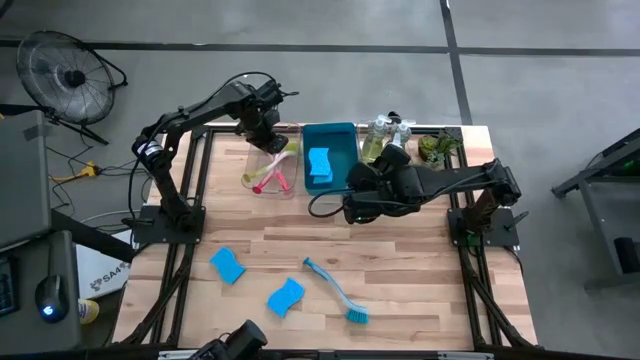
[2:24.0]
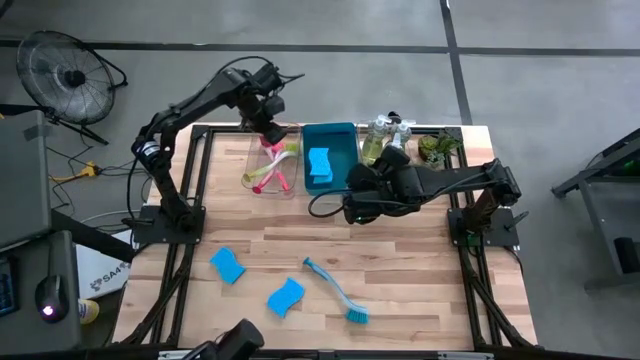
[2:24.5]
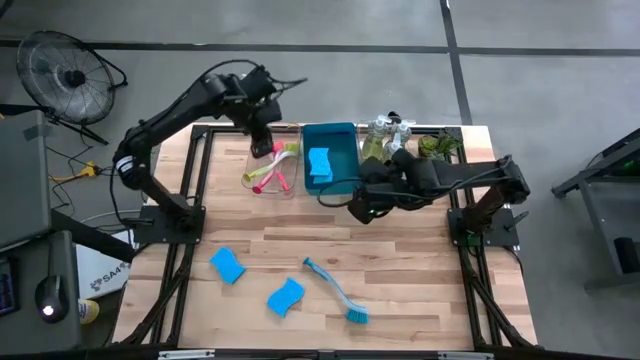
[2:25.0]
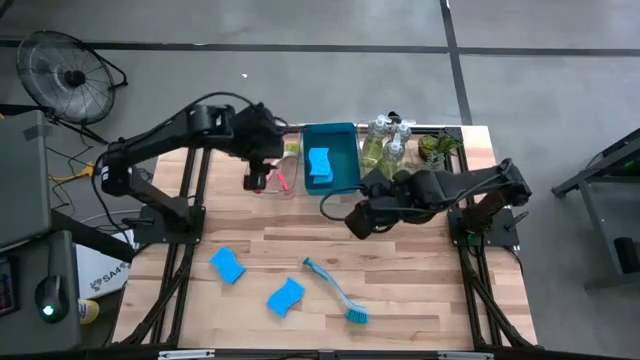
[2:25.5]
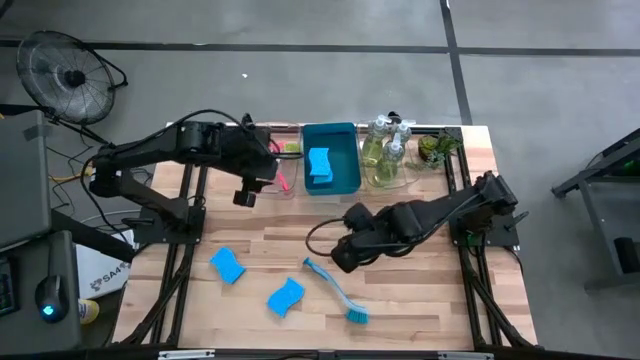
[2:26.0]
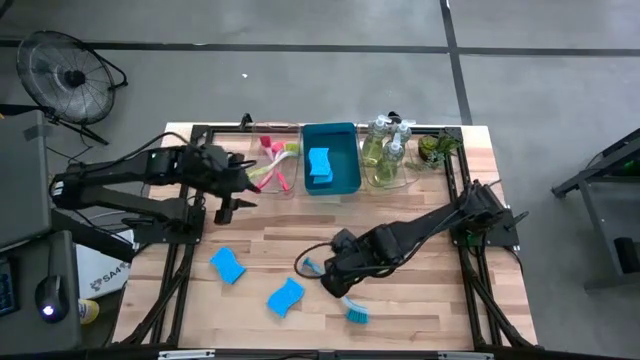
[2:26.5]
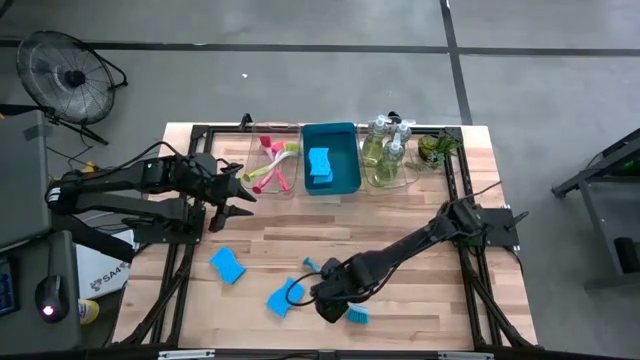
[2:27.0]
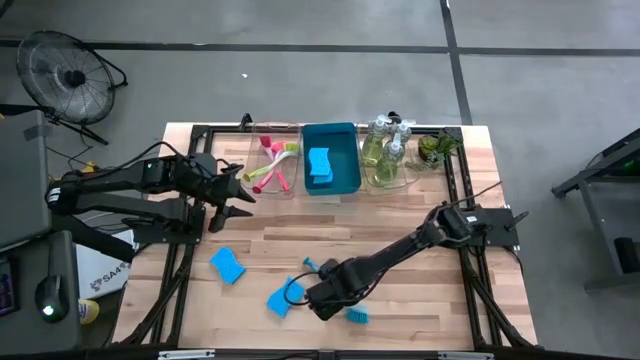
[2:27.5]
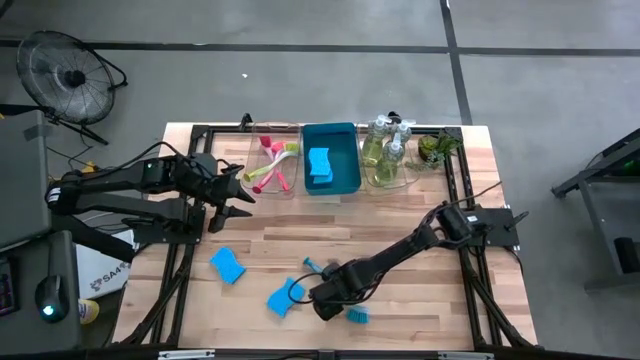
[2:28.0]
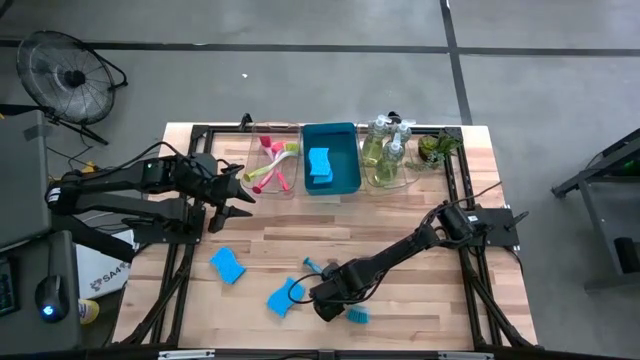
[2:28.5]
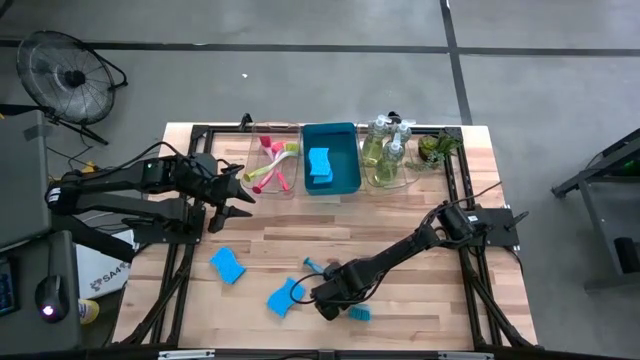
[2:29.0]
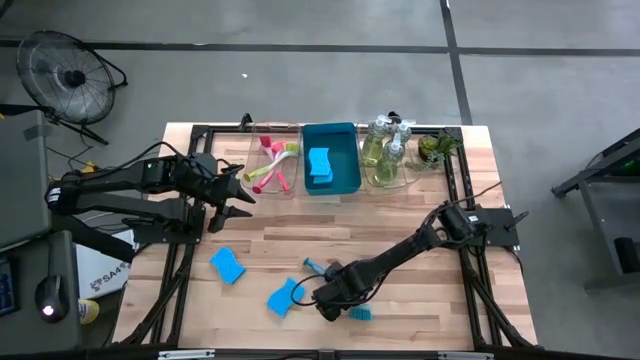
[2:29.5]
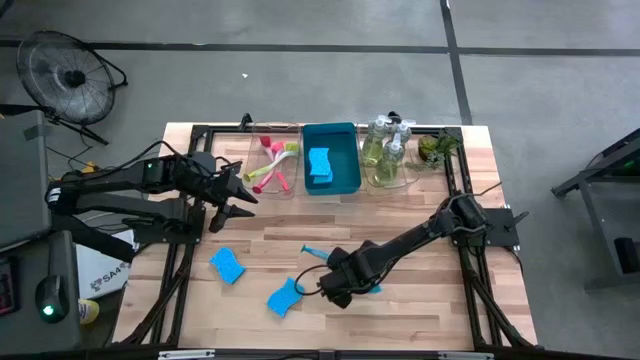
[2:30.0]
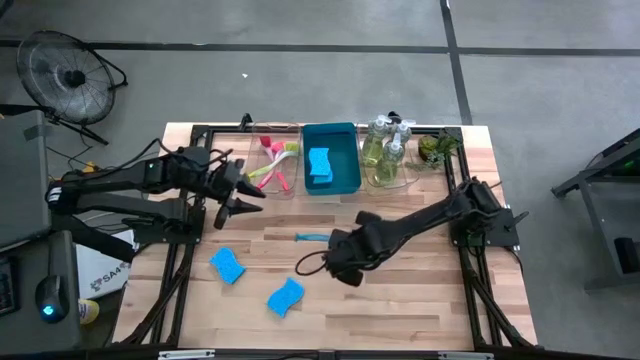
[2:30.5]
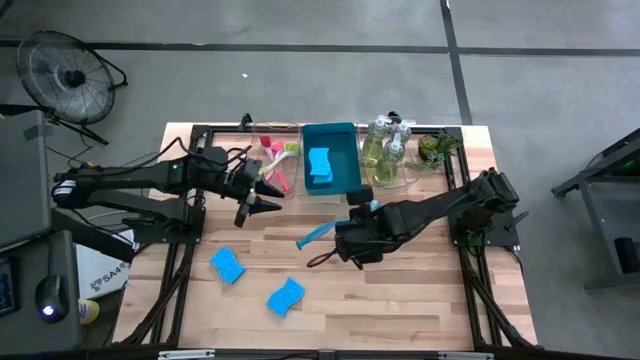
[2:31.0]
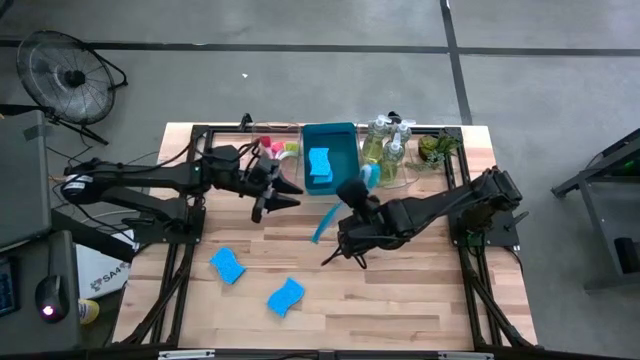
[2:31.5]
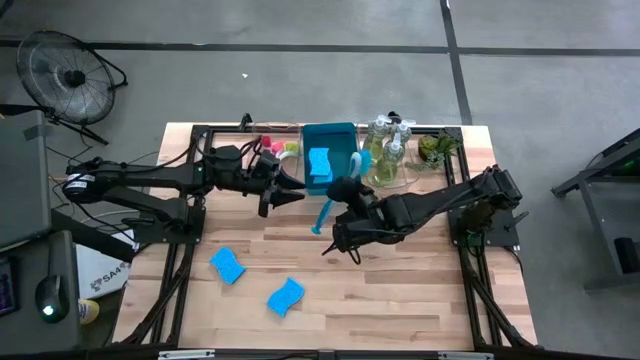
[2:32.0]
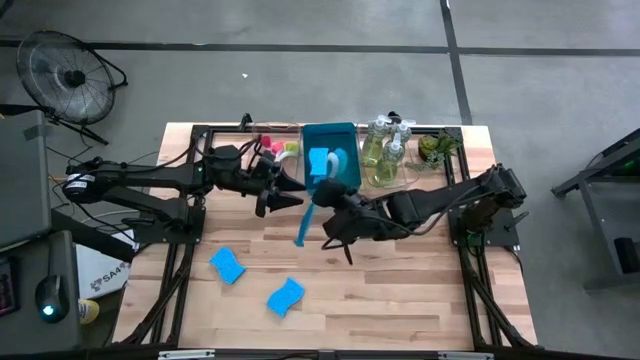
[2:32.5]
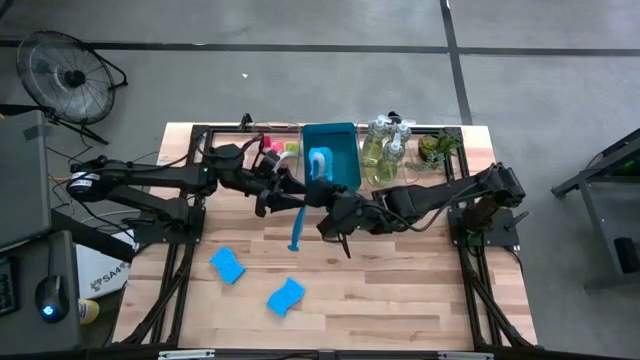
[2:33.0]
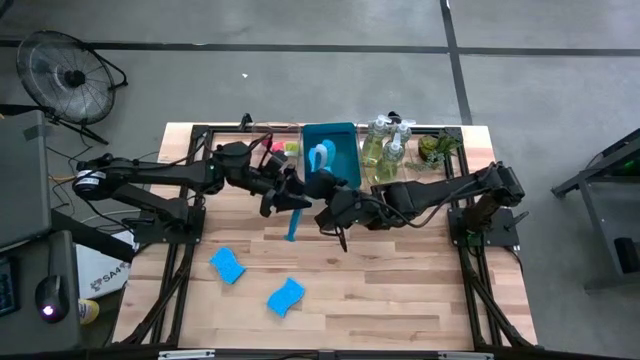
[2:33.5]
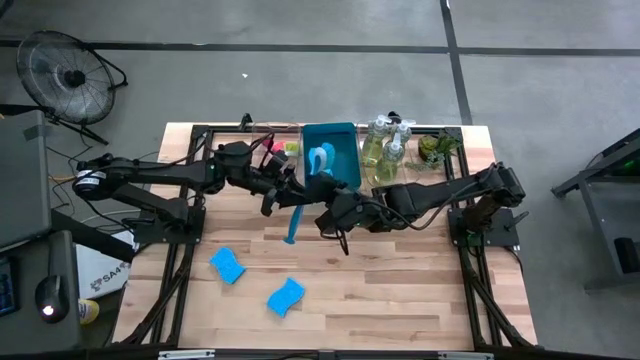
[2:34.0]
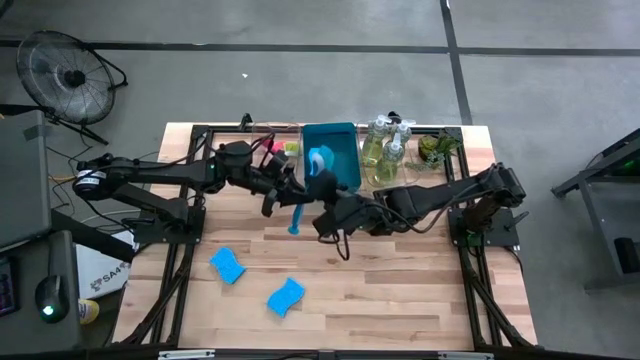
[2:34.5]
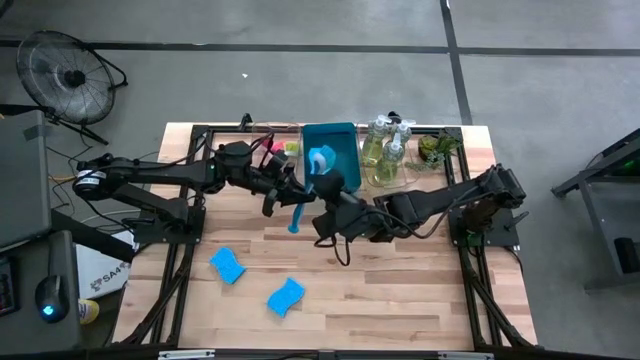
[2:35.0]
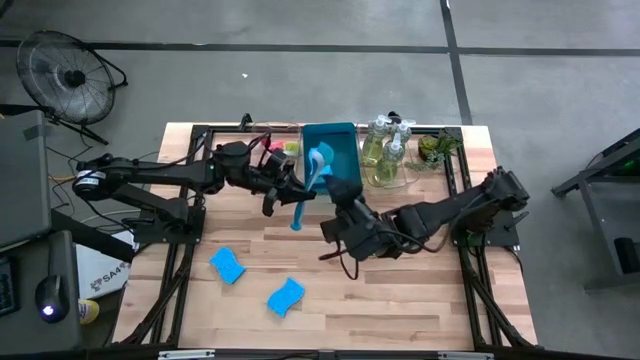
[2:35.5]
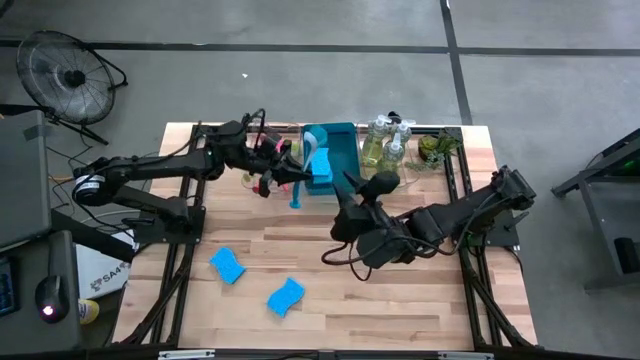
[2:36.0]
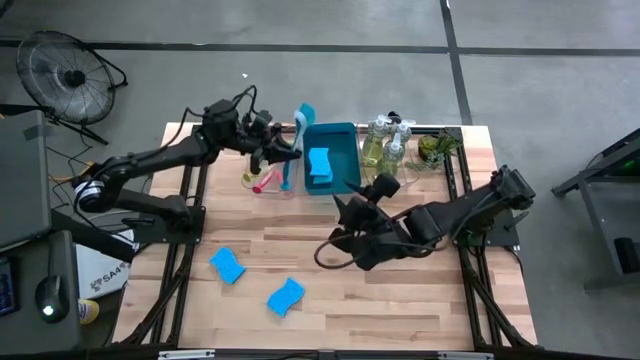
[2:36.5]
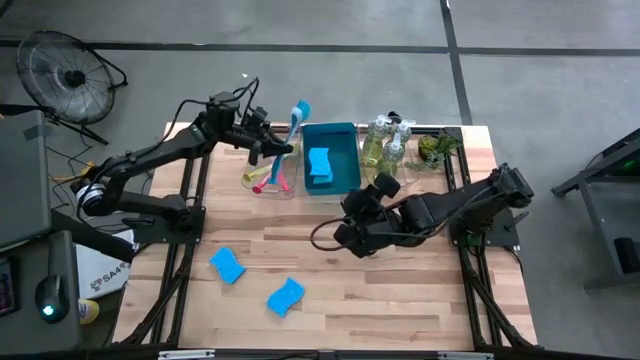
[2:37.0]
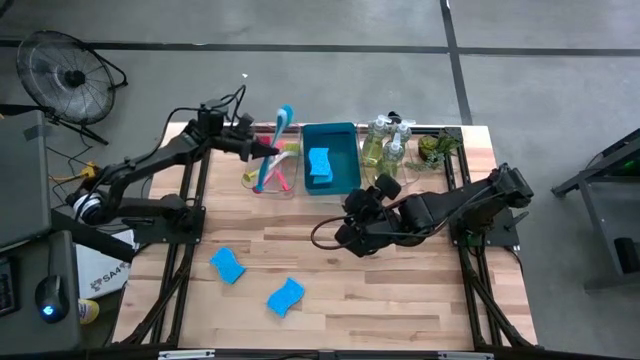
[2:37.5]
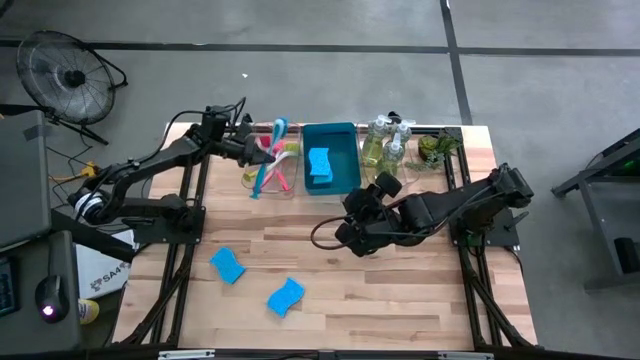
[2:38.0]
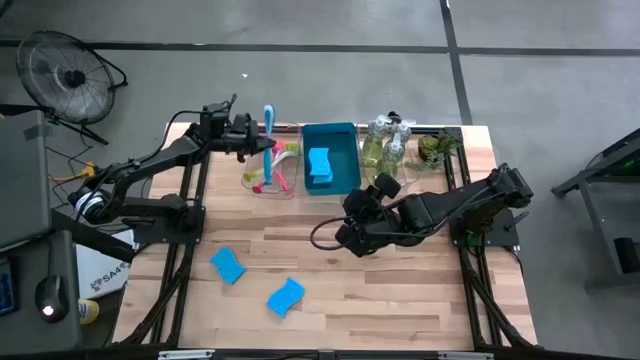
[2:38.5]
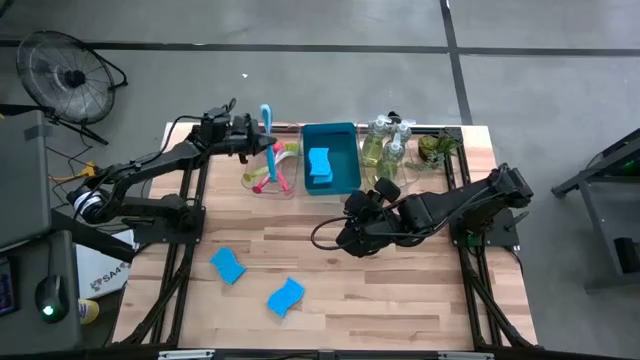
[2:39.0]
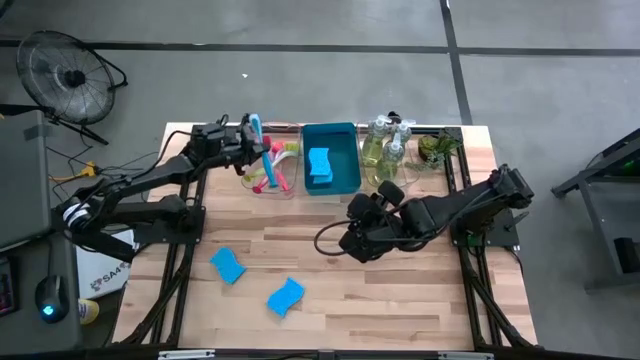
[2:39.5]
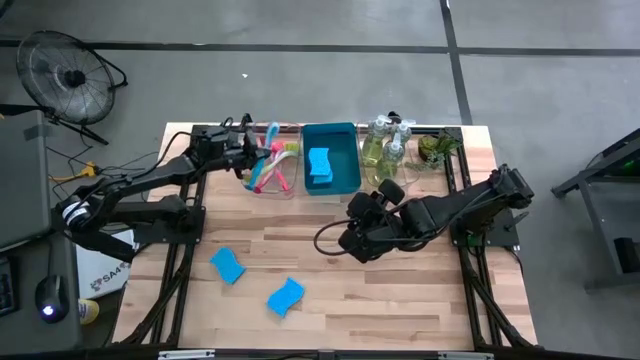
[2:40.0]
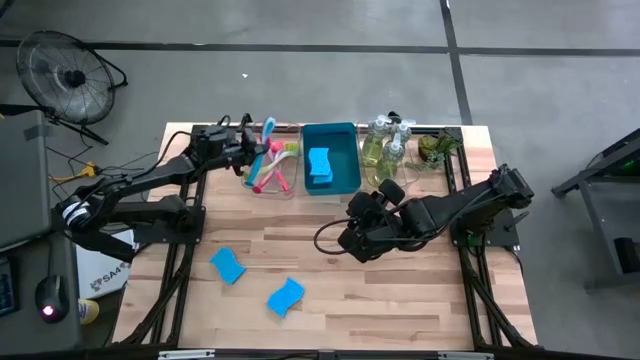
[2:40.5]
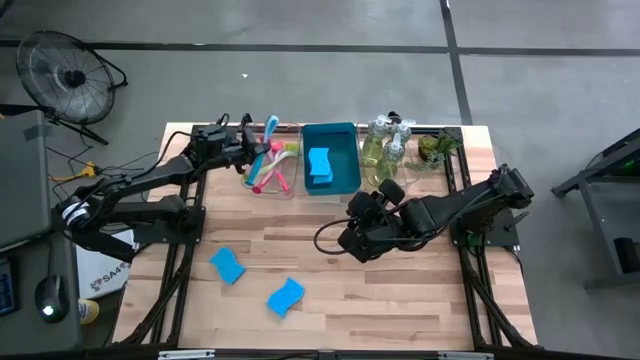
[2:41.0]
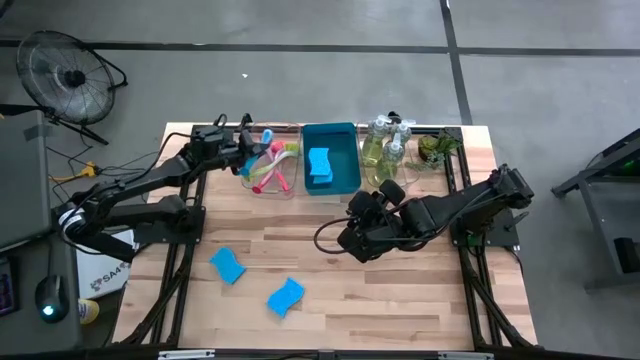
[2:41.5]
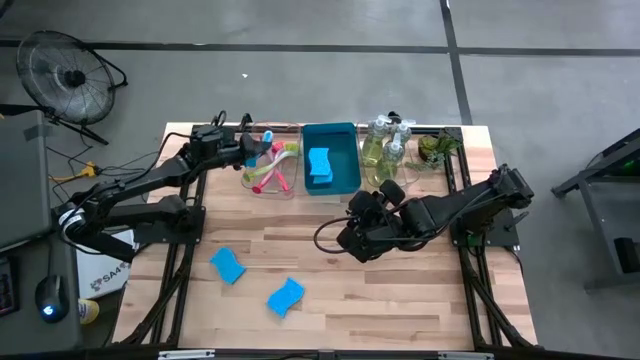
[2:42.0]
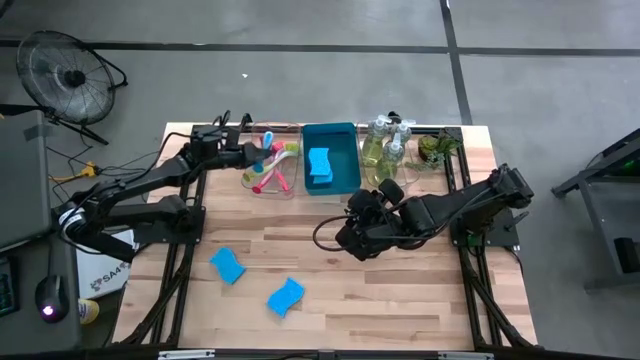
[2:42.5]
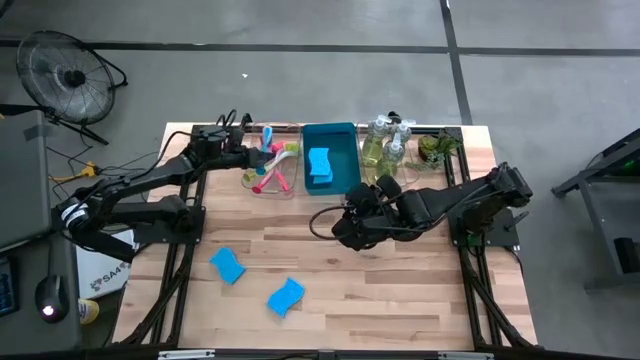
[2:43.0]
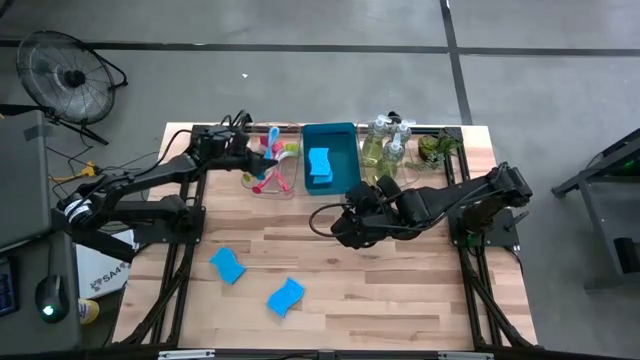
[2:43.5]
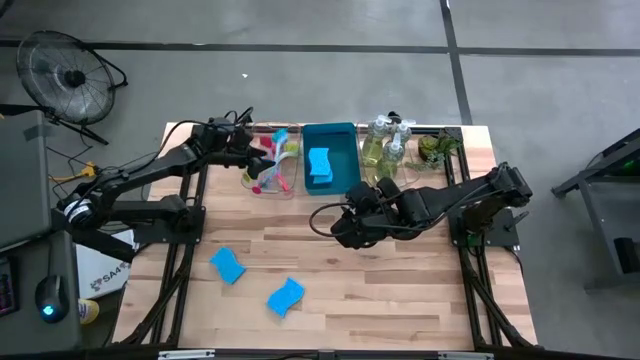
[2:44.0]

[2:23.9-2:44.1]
Task: Pick & Place Kitchen Sink Supplies
Put the blue dish brush into the left transparent bin
